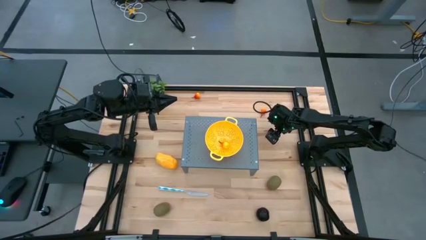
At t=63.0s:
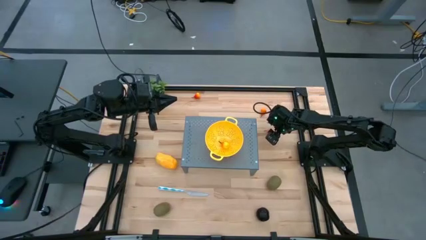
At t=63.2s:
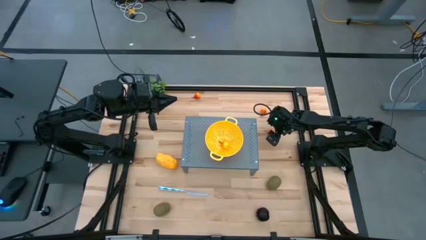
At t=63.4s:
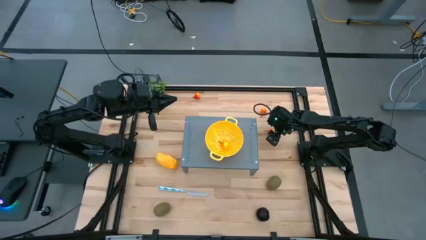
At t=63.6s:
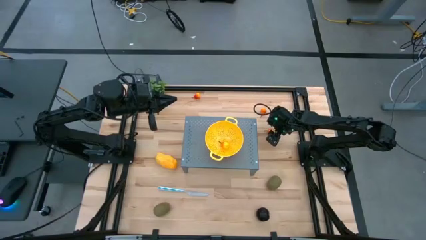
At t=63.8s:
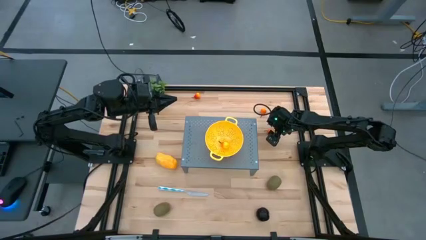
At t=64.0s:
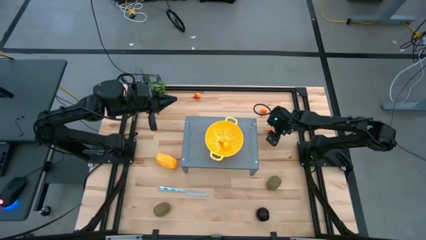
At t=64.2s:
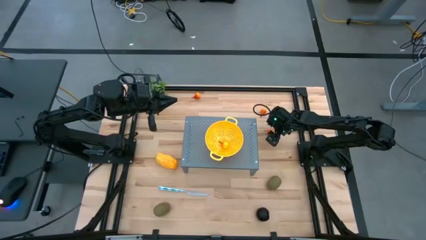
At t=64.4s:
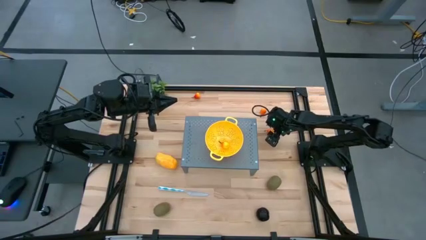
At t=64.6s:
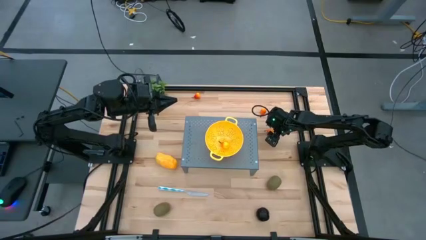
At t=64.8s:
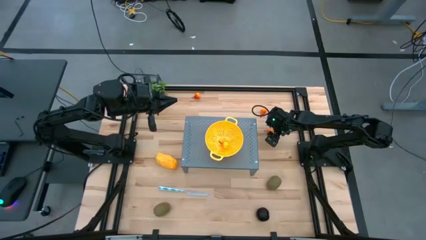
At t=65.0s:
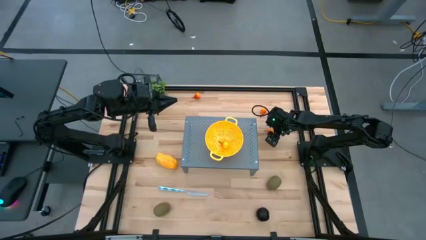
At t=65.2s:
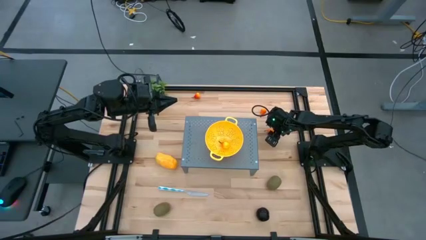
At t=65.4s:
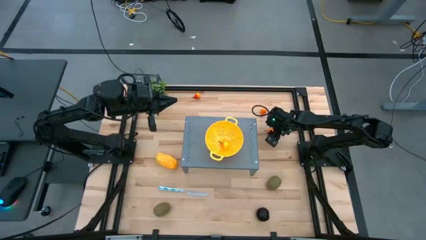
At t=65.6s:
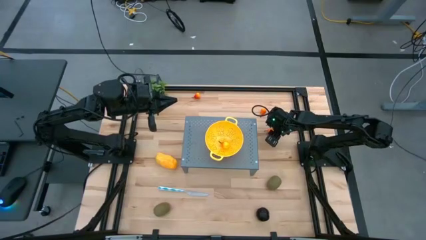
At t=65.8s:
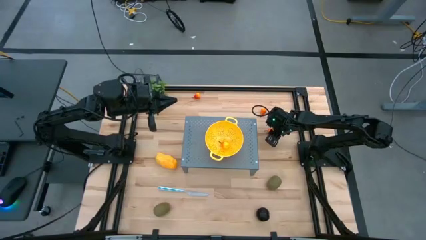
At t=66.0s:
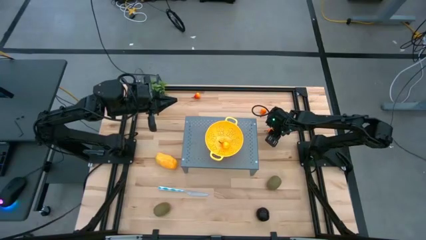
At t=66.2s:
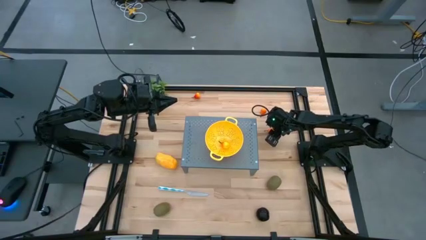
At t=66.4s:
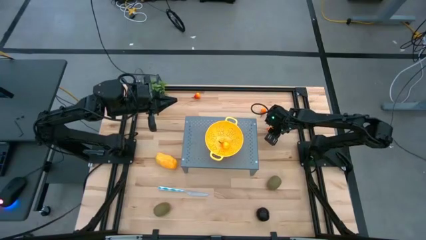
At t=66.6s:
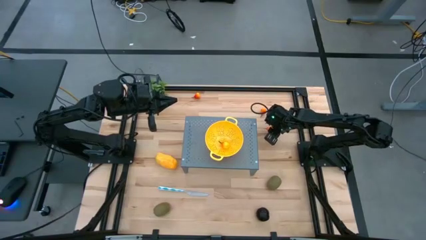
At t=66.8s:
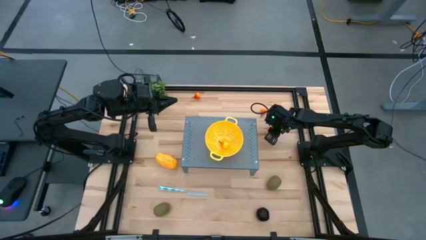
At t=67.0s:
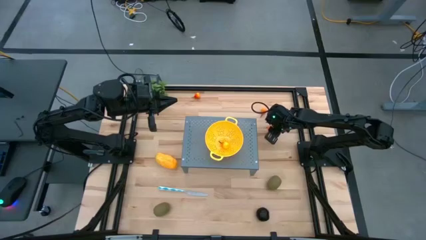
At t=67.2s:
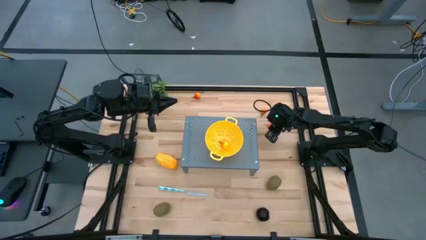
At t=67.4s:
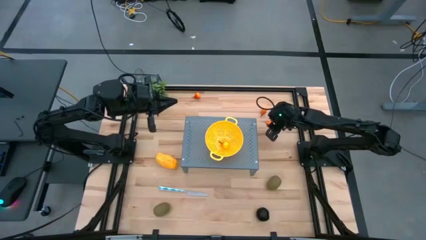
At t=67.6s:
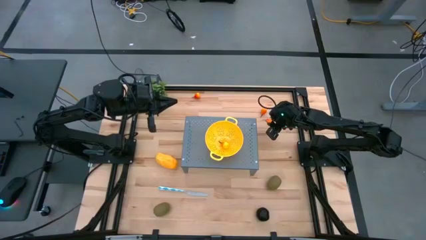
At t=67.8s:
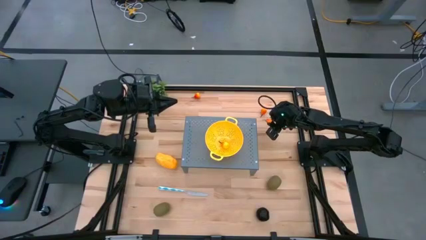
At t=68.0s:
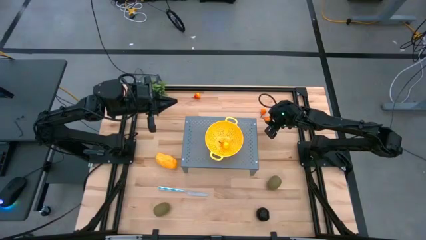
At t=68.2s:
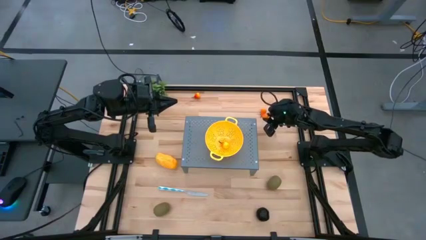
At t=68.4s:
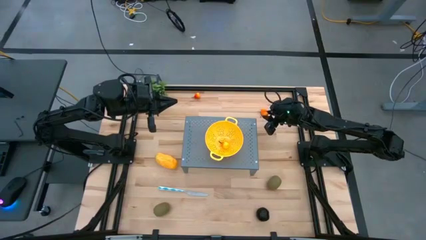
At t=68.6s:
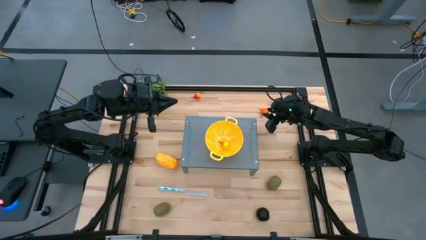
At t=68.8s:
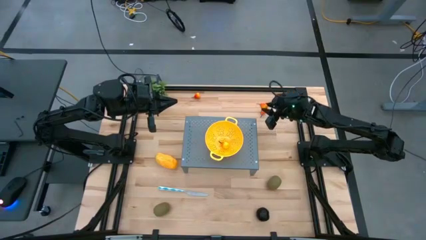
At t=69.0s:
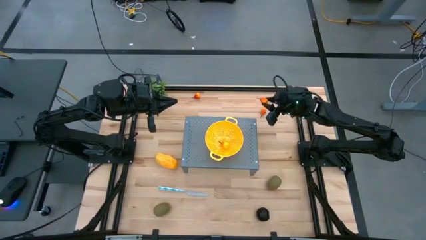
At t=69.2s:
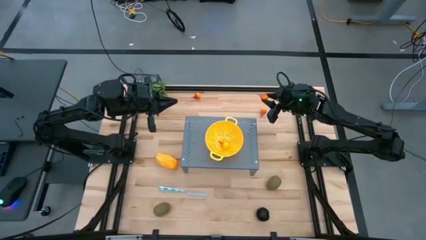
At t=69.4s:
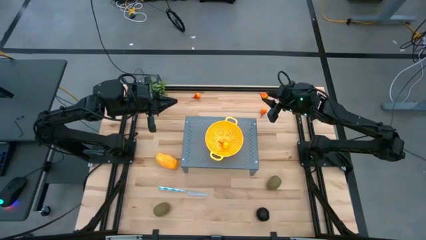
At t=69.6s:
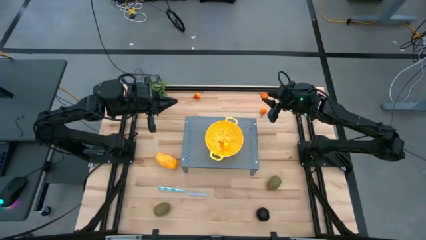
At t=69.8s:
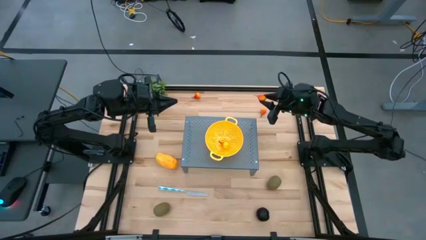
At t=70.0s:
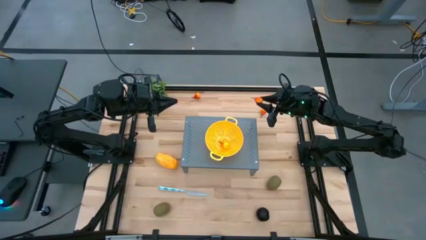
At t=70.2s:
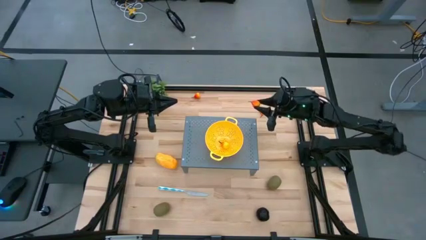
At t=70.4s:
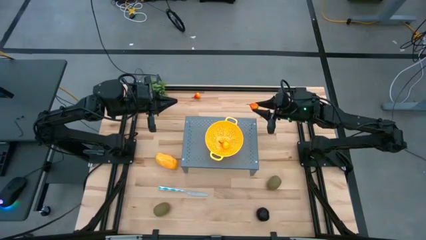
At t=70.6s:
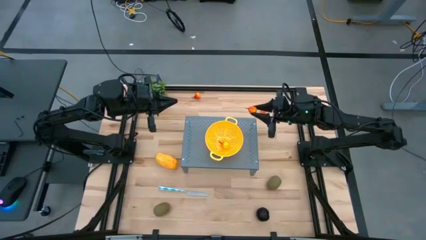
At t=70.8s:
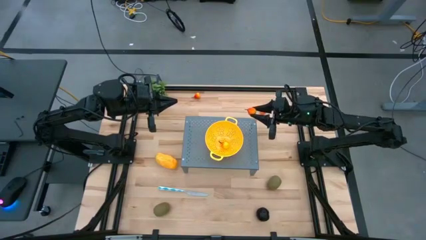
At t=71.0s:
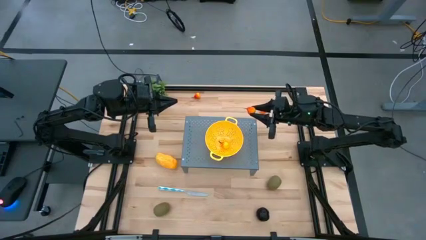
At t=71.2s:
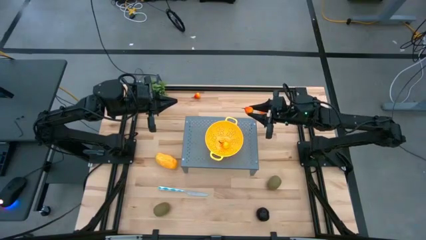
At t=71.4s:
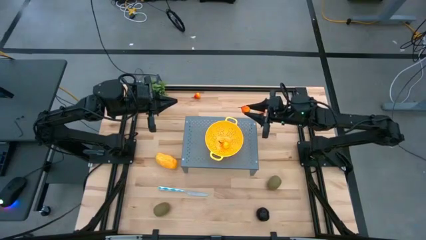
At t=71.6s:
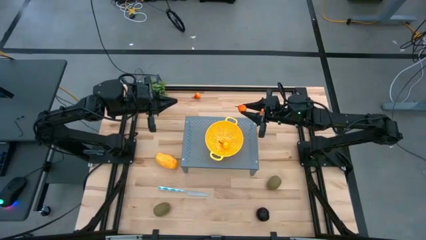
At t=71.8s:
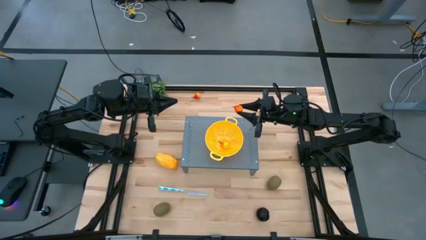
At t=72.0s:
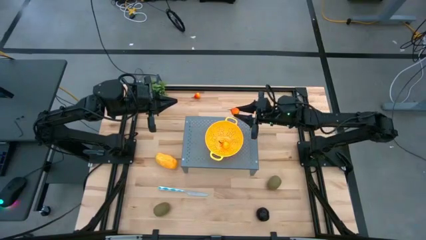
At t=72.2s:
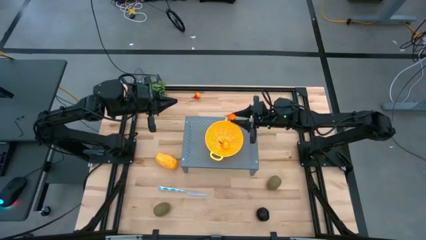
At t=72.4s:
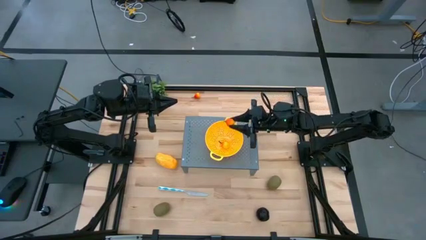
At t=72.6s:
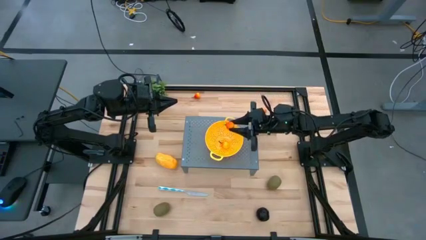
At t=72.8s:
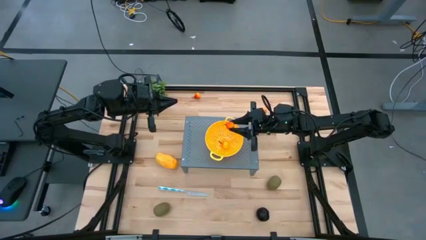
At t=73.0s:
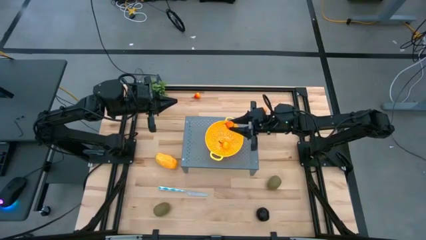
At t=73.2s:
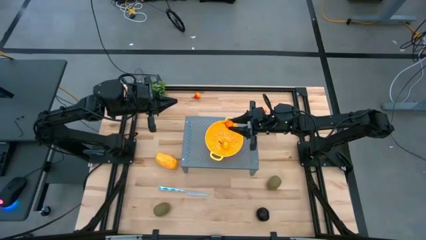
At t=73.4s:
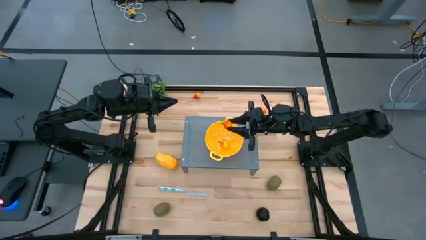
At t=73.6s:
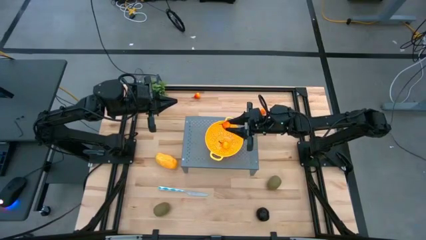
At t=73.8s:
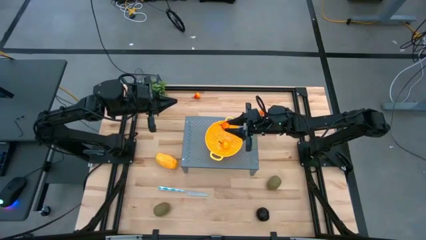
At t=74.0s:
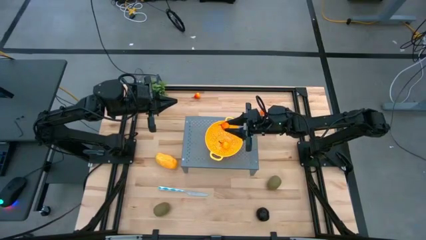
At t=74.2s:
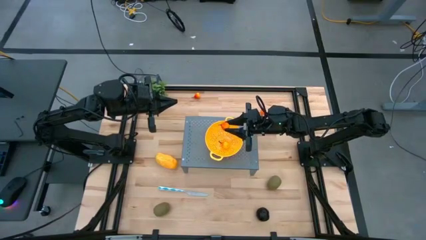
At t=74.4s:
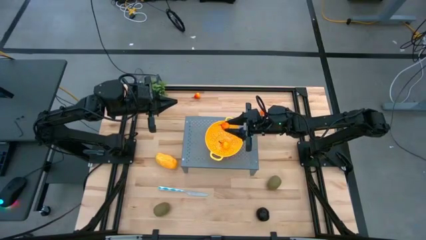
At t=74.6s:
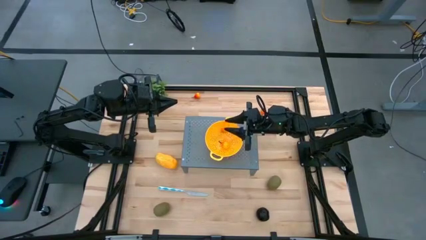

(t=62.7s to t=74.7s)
Task: Pick & Place Fruit
Put the right bottom pear into the strainer bowl on the shelf

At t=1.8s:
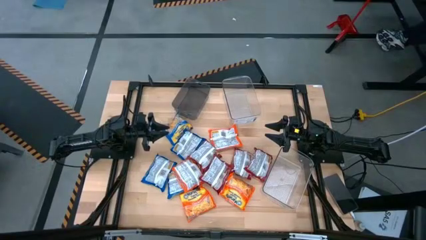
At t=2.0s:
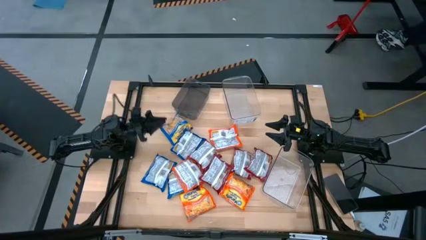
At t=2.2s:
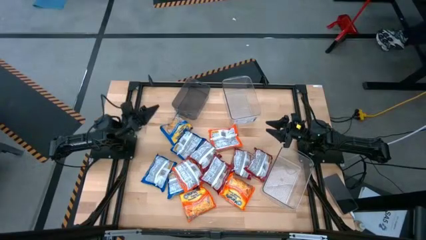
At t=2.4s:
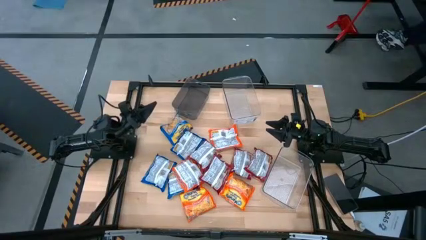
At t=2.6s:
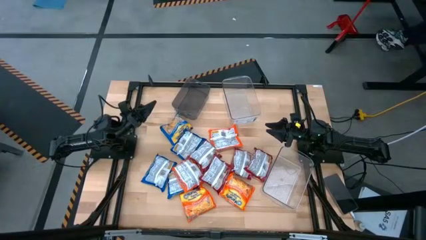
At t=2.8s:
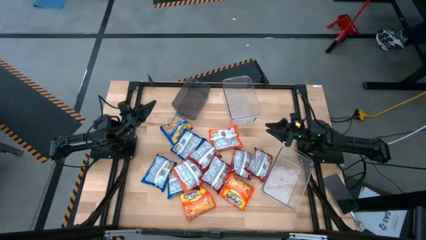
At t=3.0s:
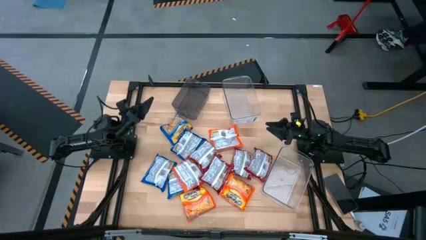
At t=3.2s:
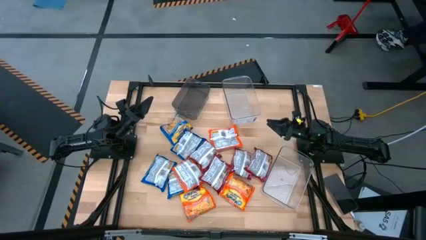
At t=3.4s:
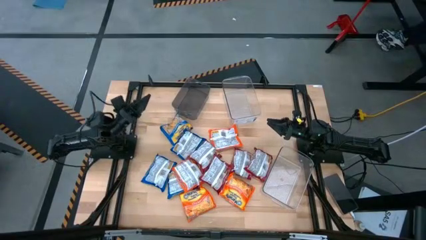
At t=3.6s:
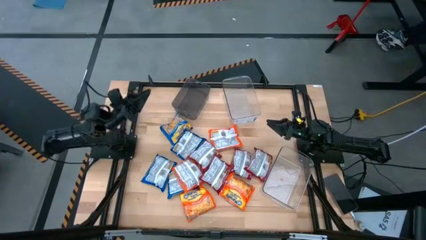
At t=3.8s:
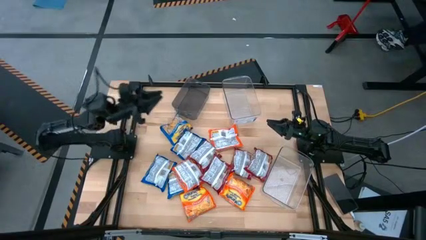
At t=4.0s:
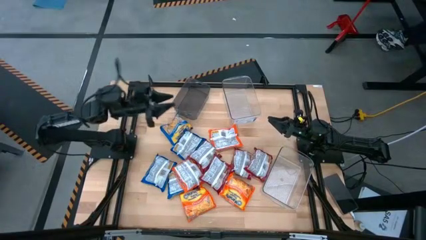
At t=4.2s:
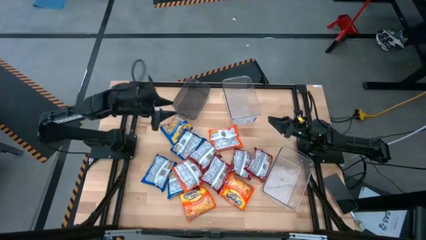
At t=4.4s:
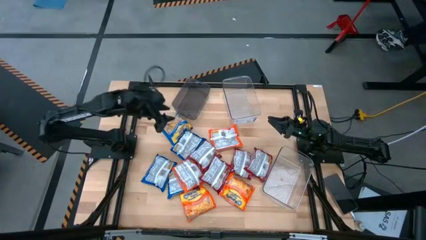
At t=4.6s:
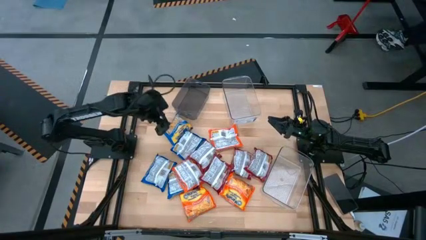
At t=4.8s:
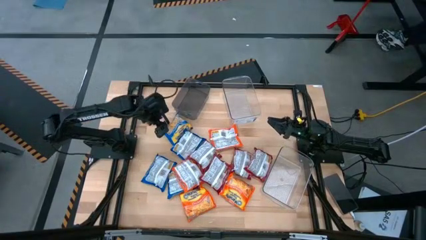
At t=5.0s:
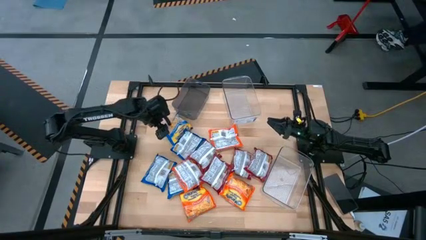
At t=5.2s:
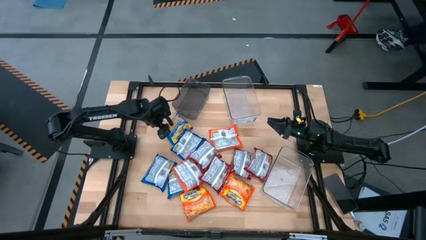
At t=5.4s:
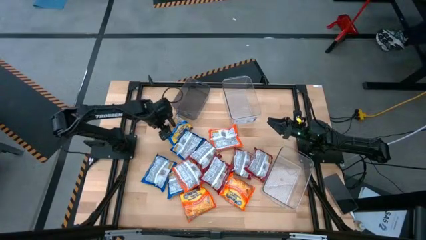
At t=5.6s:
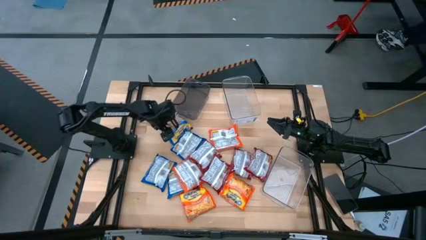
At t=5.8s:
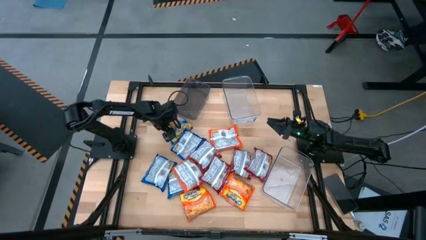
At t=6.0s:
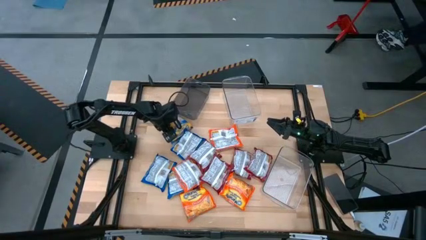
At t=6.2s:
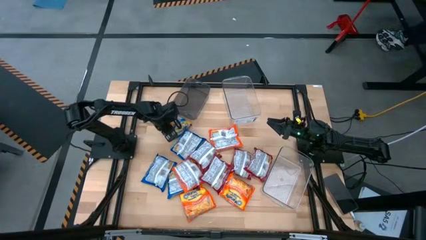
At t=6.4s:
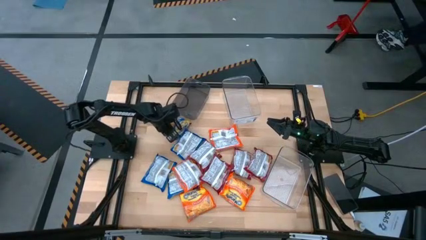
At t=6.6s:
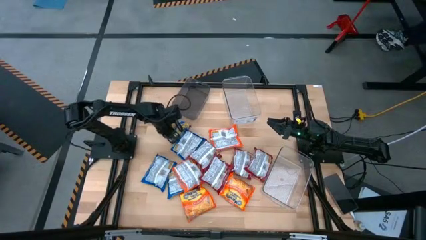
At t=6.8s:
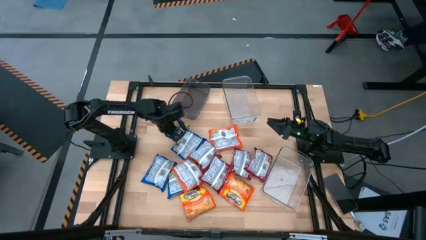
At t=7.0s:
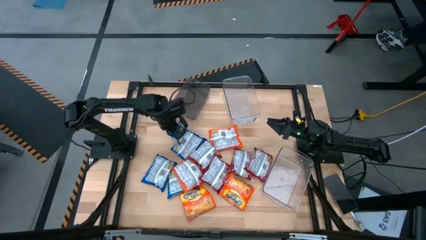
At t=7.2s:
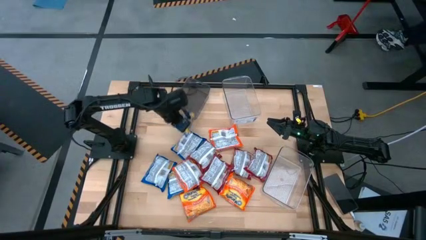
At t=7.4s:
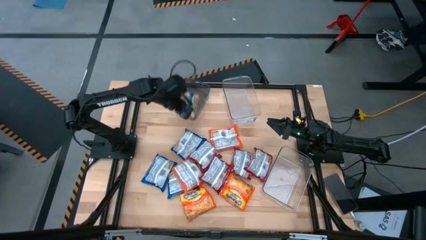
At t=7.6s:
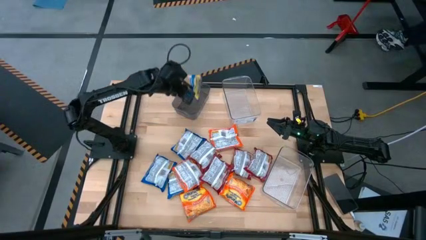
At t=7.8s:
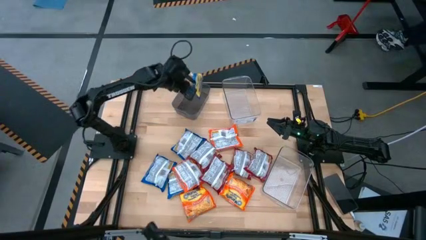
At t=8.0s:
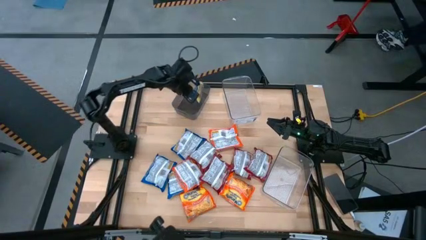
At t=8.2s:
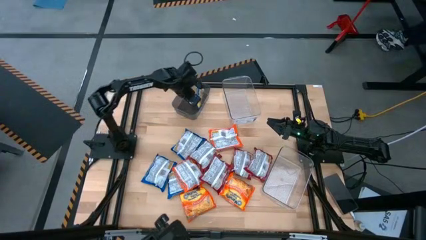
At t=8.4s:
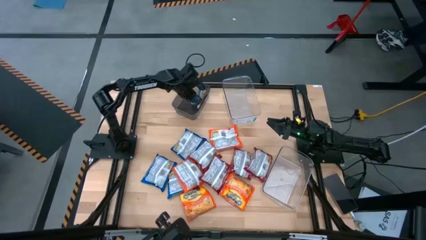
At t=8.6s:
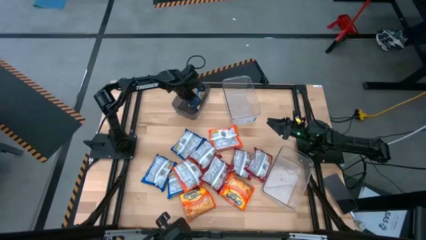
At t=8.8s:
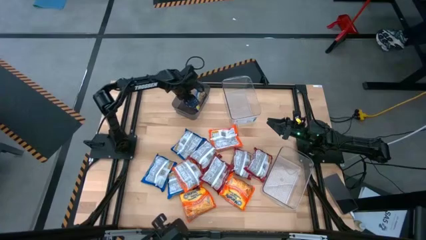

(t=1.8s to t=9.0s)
Task: Sort Maruchan noodles
Put the blue noodle pack into the black bin
